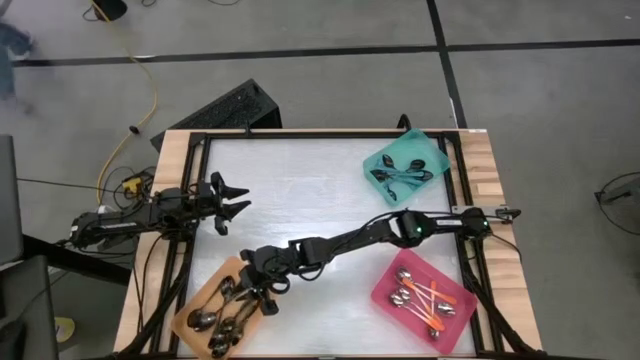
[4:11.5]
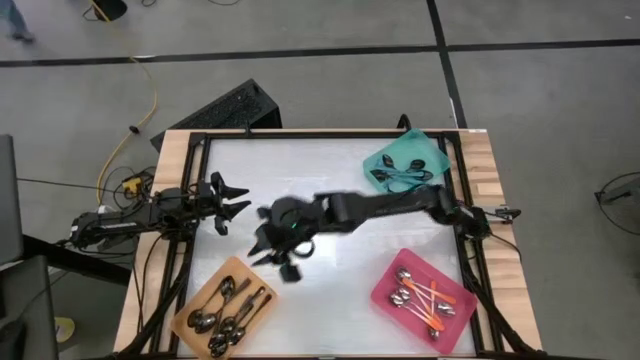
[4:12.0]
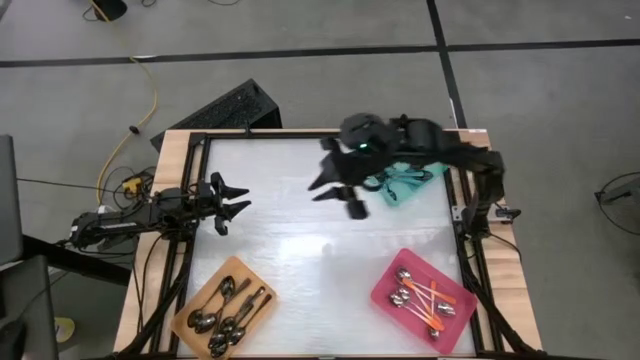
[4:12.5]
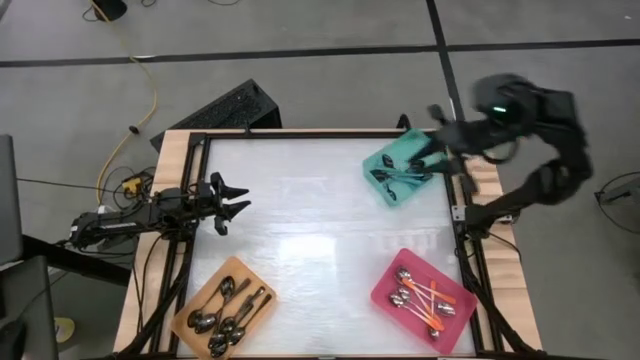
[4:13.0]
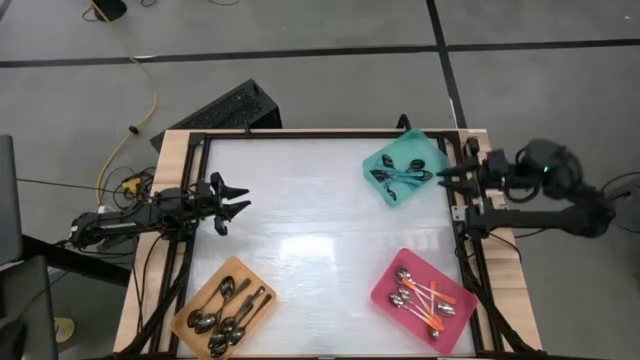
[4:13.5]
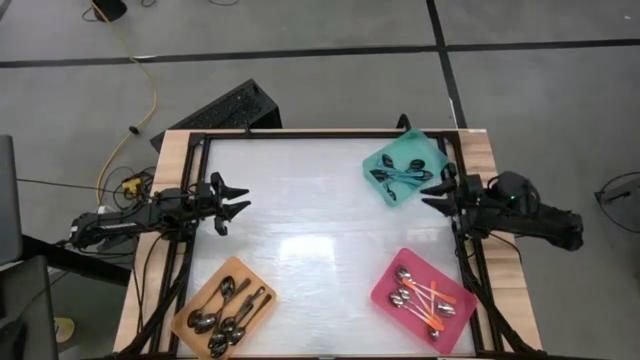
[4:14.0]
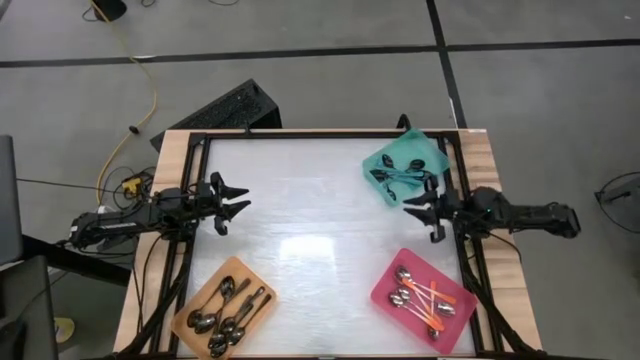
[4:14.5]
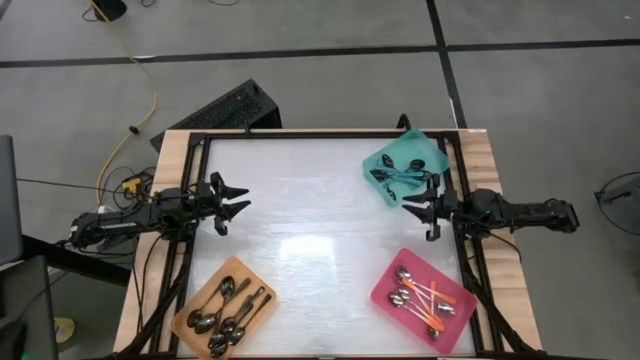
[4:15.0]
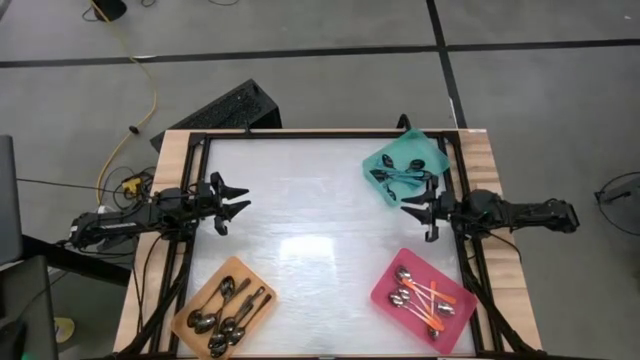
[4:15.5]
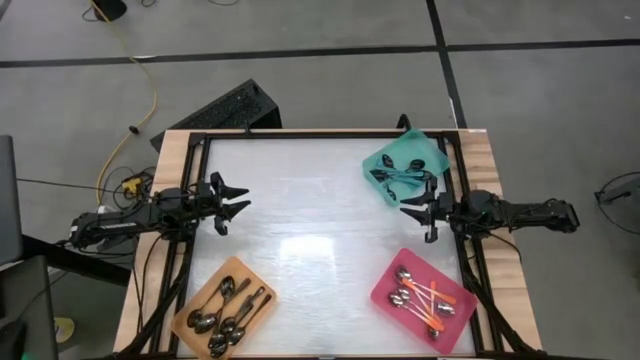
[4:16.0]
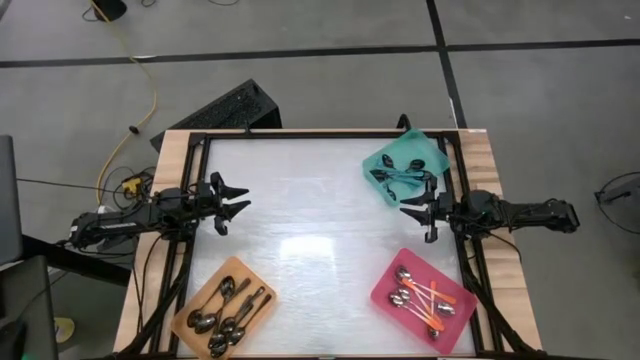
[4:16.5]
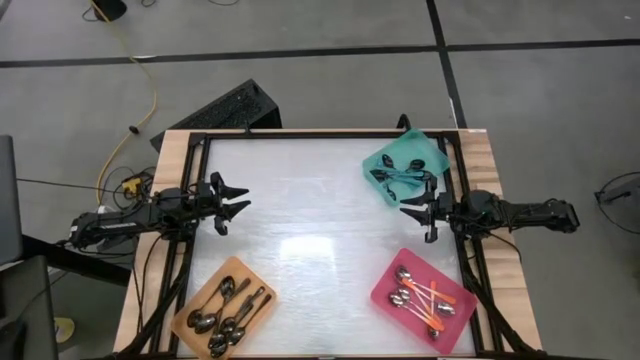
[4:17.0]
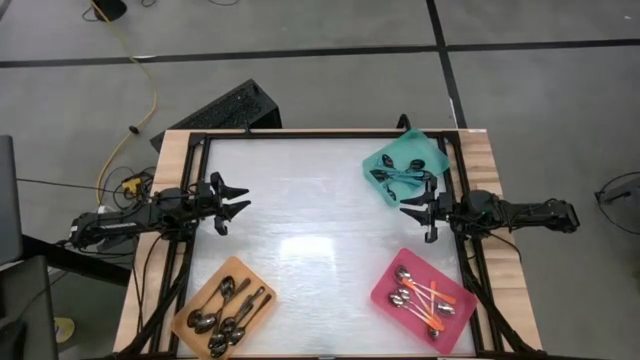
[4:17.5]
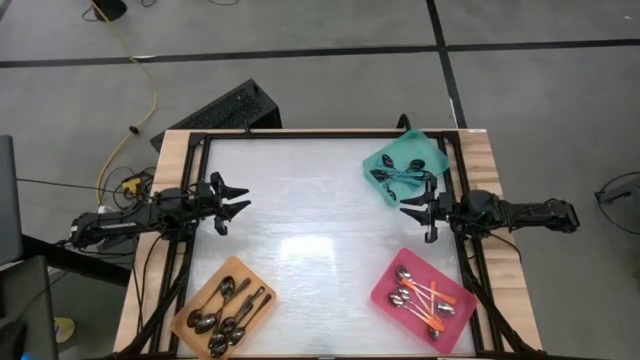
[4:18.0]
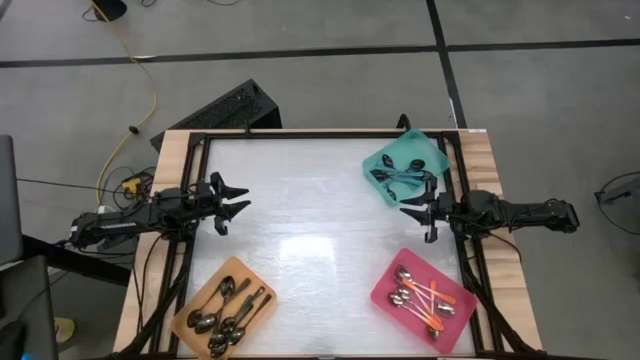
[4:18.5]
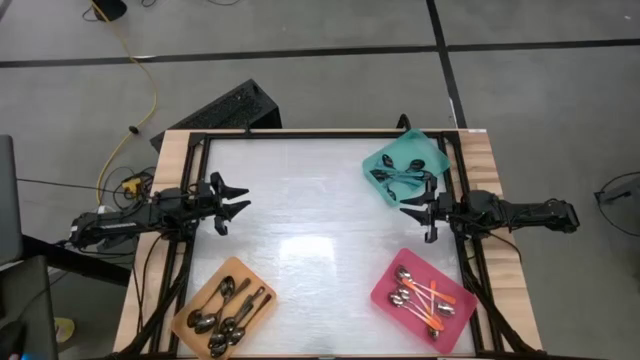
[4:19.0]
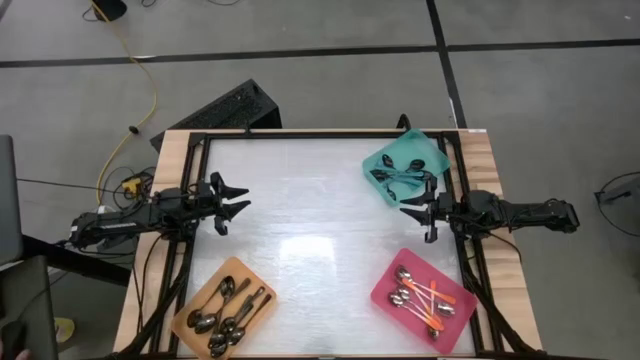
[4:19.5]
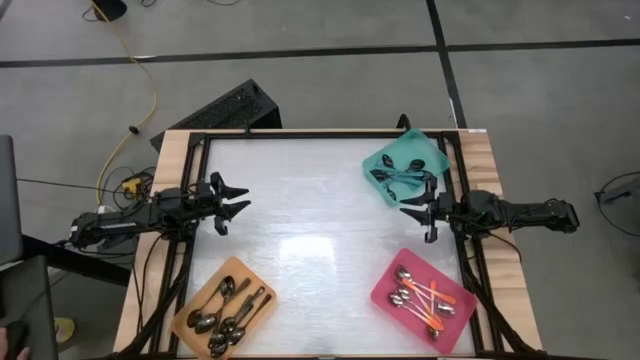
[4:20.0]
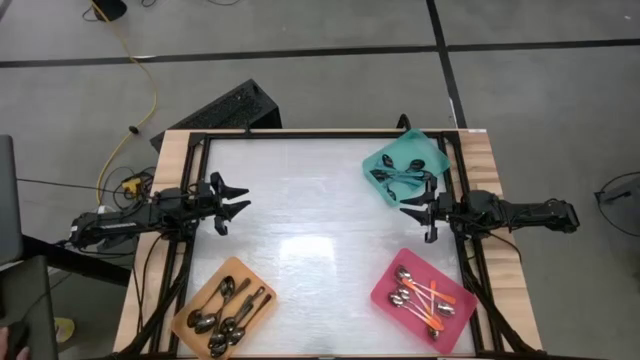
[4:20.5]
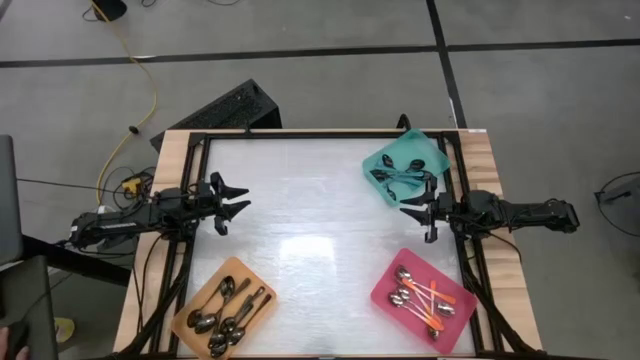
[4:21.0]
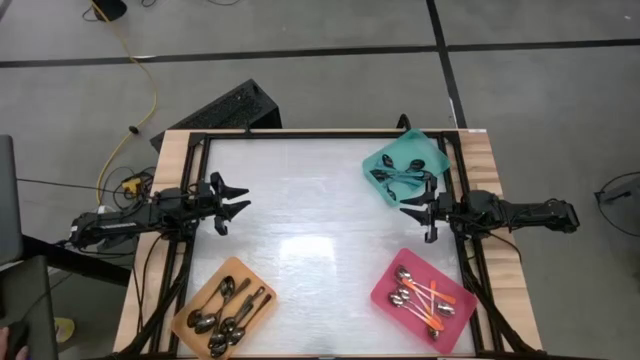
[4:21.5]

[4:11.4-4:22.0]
Task: Sort silverware by color (type)
Return to Home Position

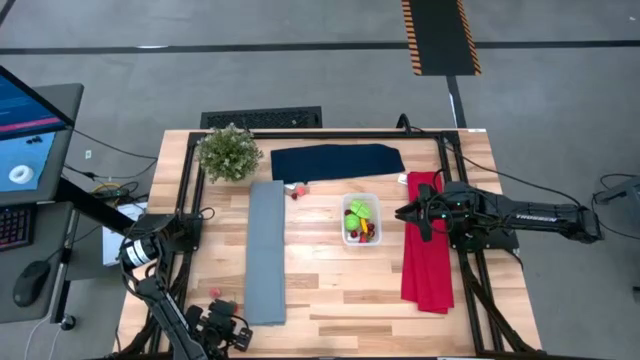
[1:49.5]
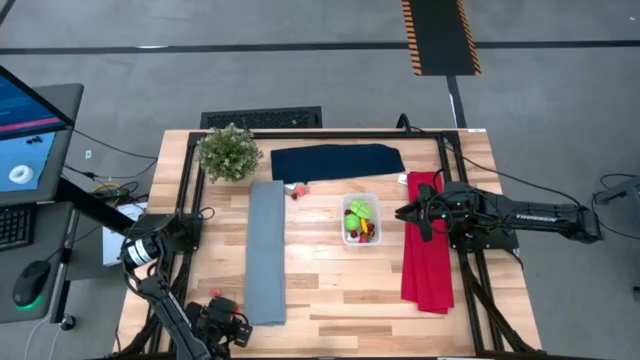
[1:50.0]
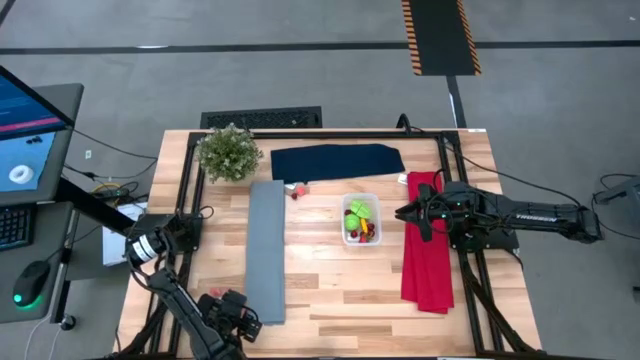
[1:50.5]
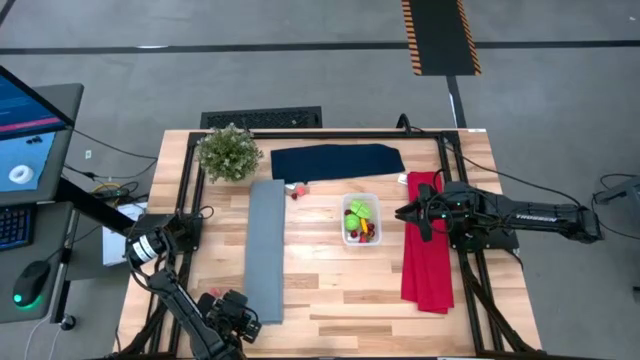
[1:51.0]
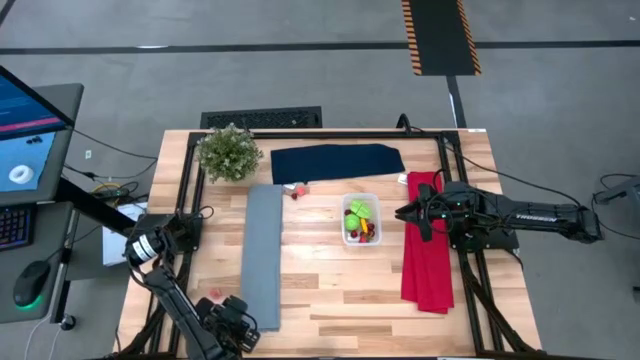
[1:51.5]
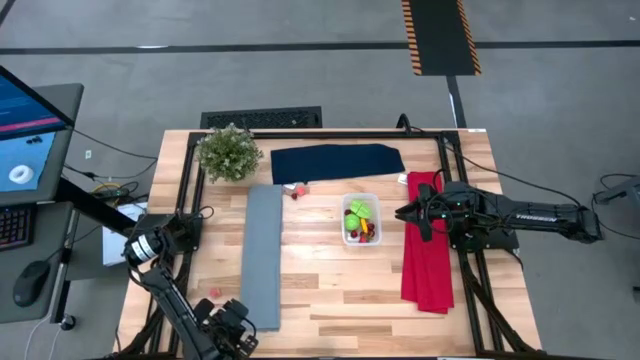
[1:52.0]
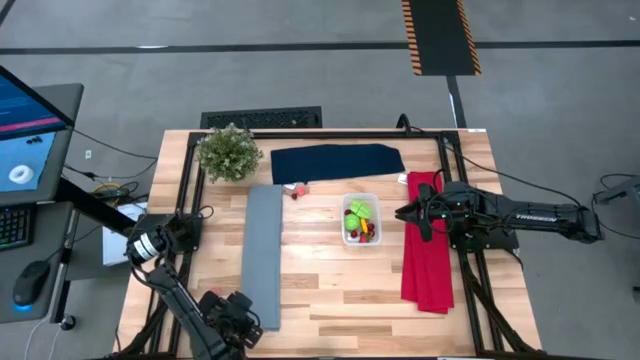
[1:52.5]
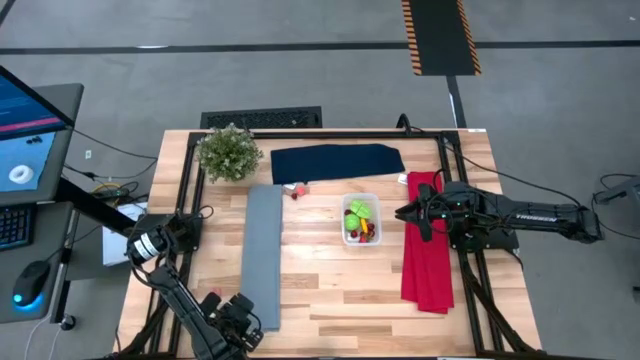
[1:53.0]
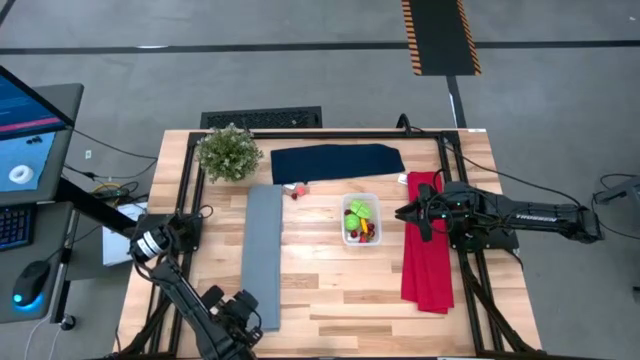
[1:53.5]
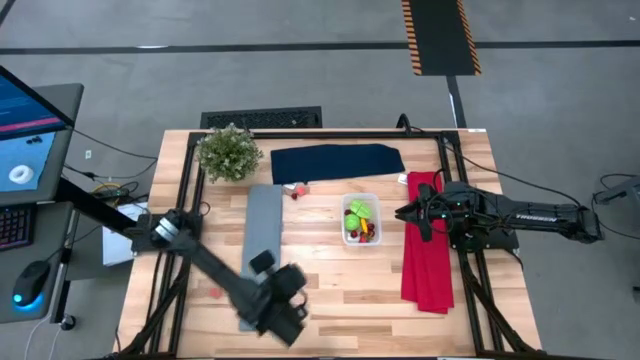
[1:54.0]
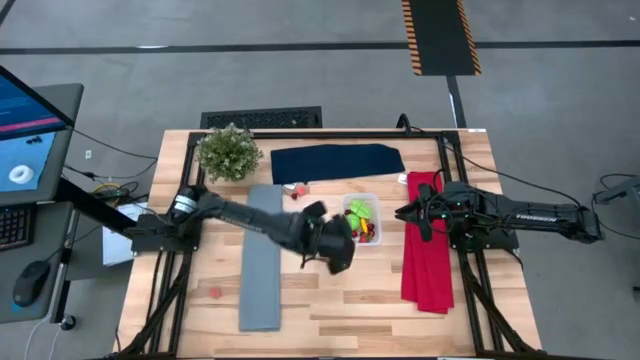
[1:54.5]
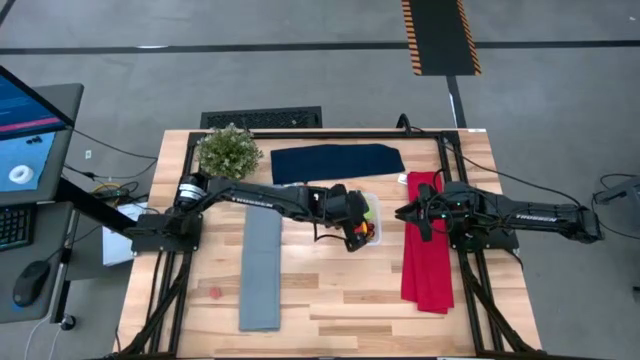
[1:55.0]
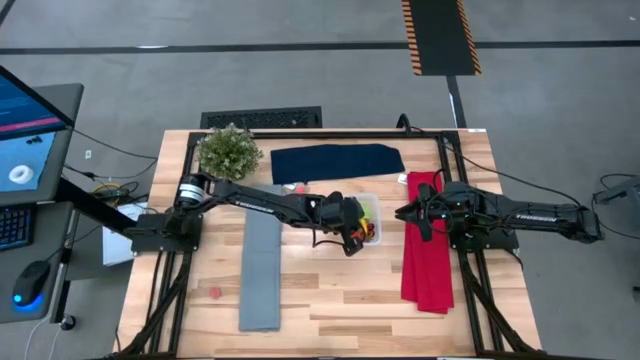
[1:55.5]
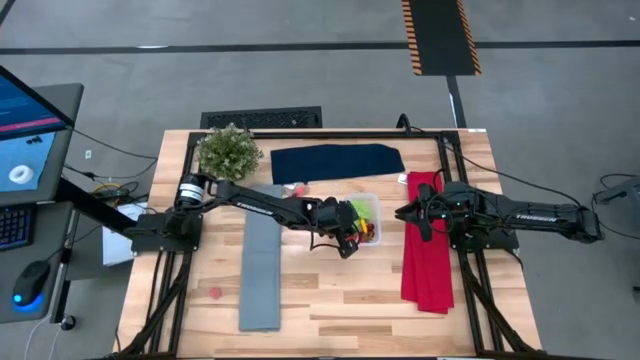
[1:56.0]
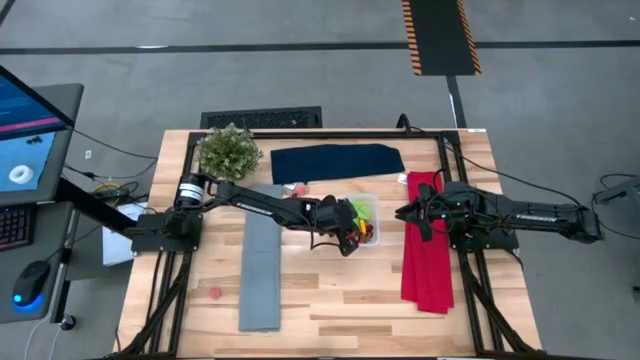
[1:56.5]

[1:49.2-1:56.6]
Task: Pick and placing Produce into tupperware
Put the red strawberry into the transparent bin

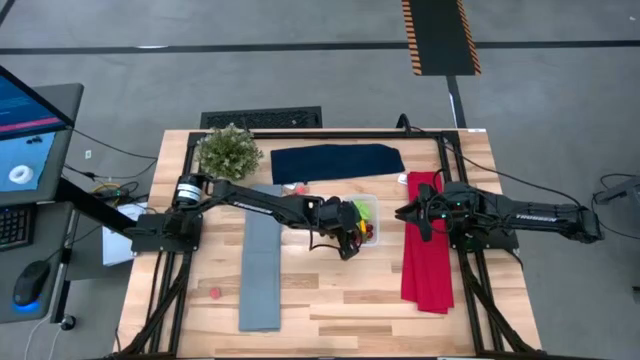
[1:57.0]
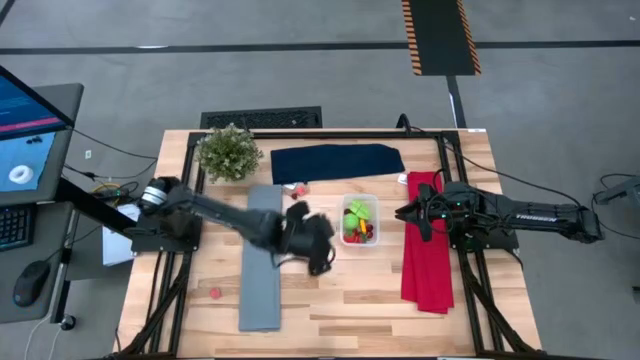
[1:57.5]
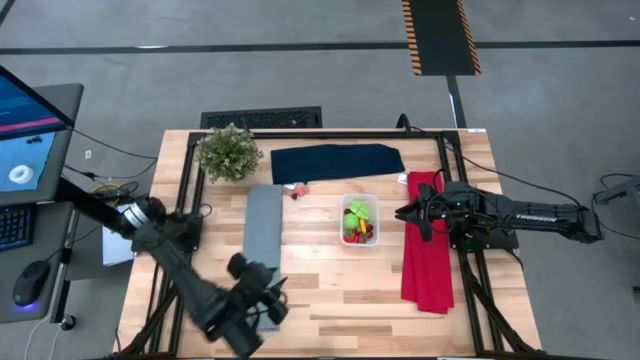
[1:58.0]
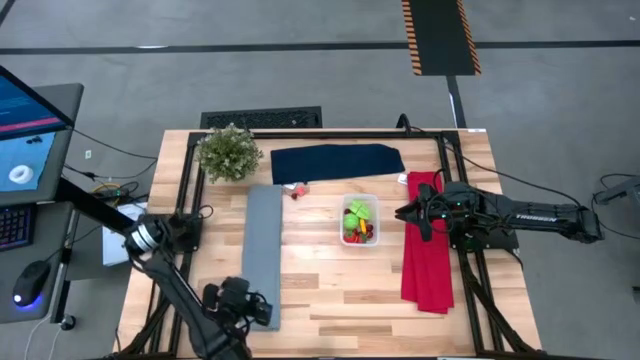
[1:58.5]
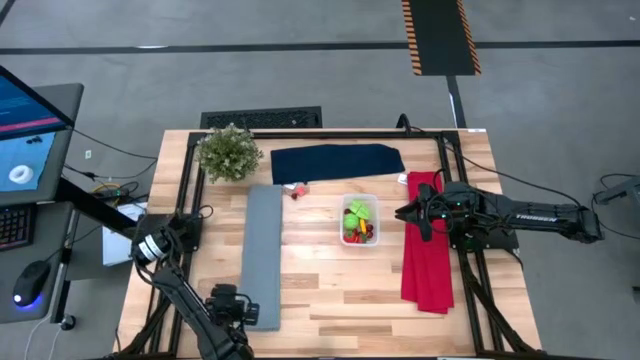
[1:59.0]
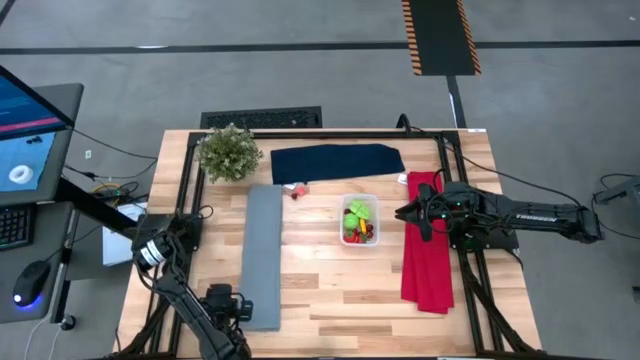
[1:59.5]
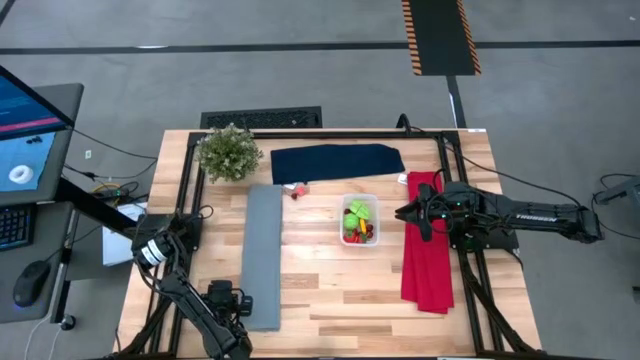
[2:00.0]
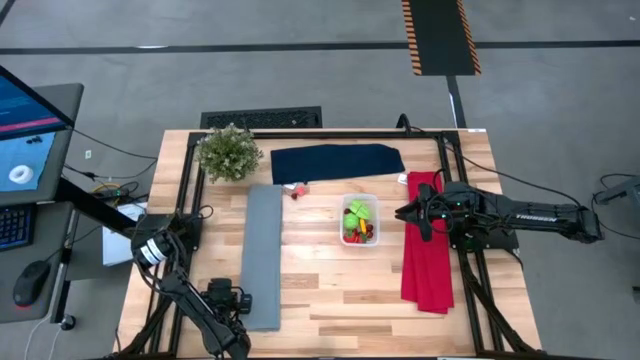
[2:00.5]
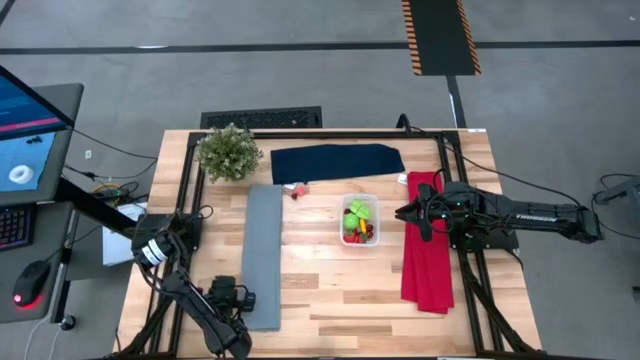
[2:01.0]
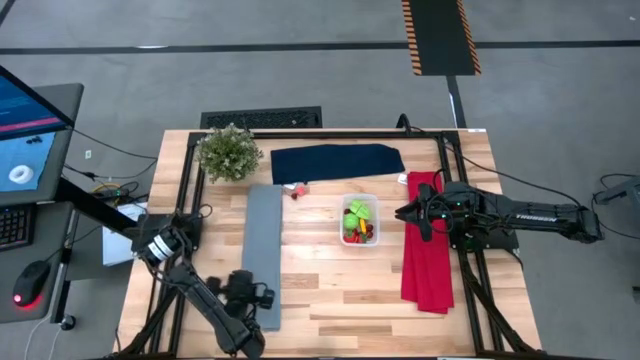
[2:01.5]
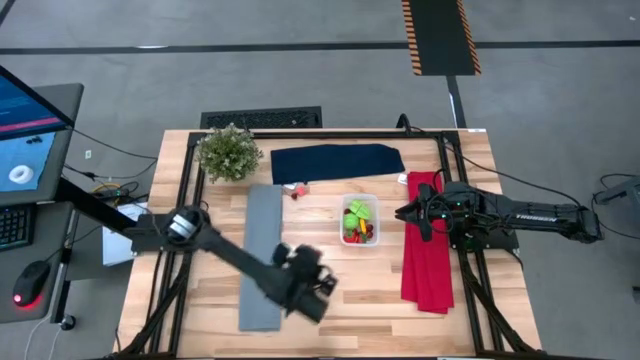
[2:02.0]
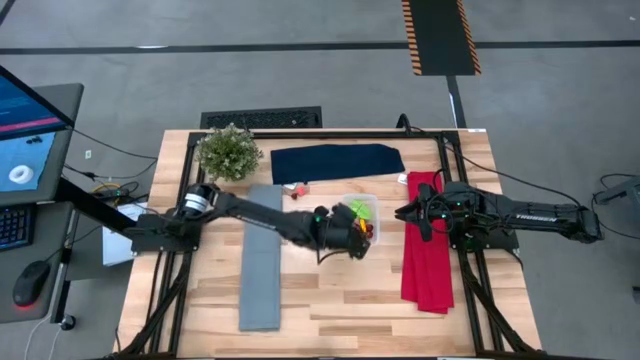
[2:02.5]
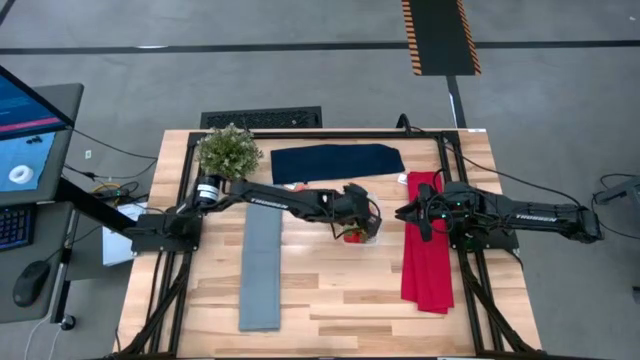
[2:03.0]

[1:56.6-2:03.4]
Put the pink peach into the transparent bin
